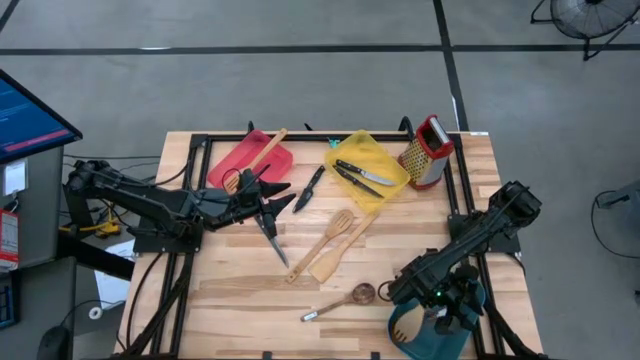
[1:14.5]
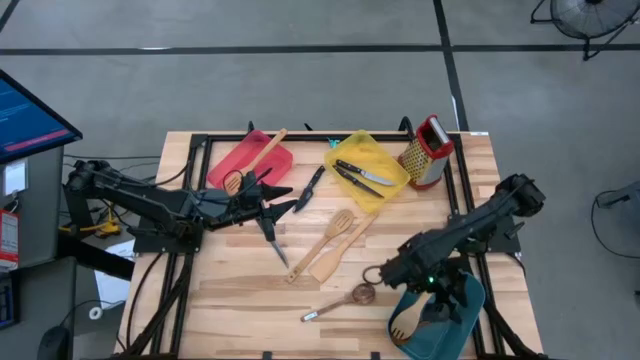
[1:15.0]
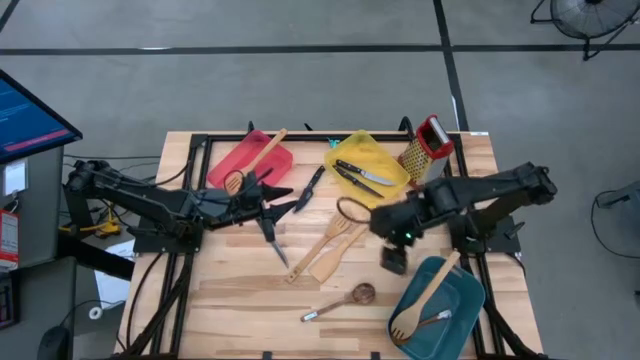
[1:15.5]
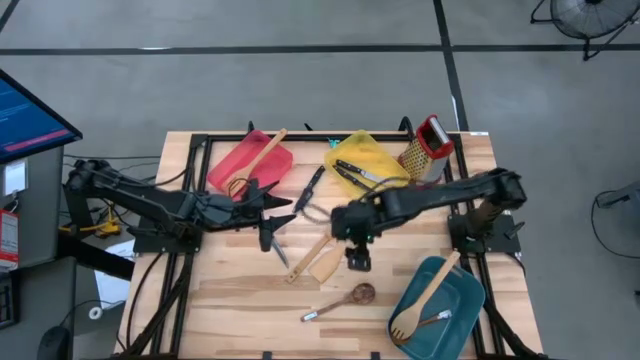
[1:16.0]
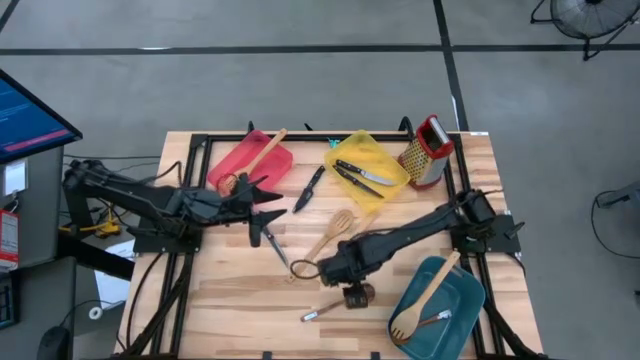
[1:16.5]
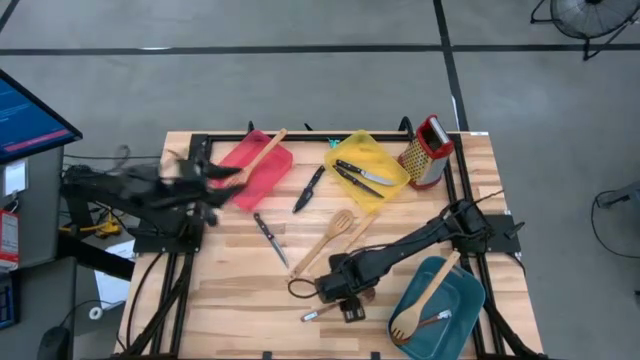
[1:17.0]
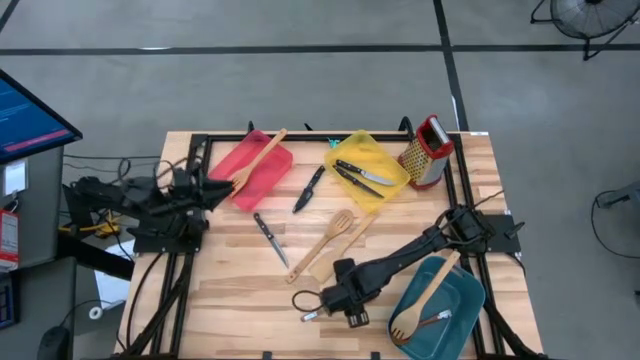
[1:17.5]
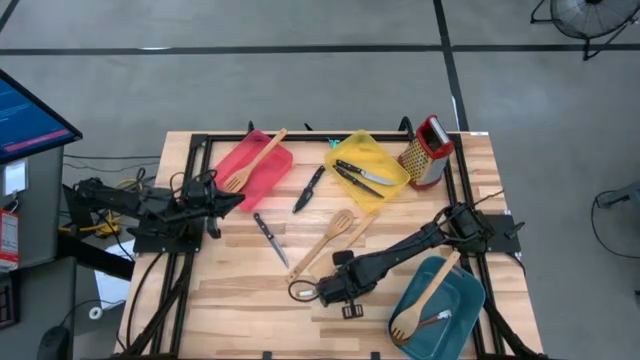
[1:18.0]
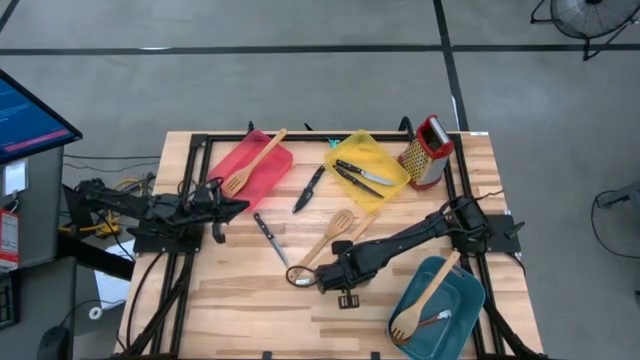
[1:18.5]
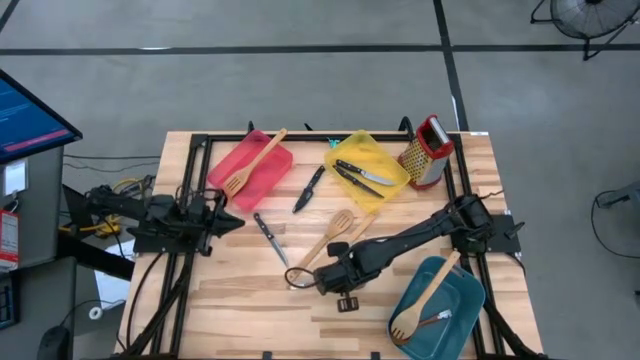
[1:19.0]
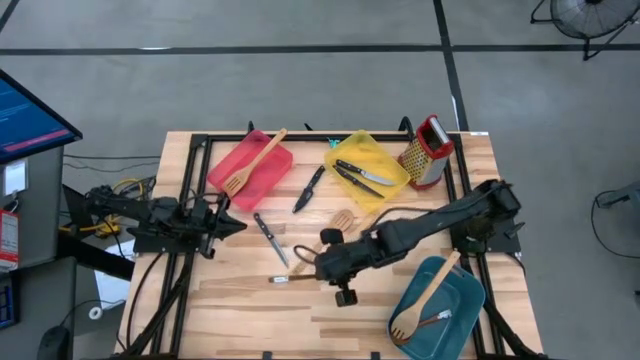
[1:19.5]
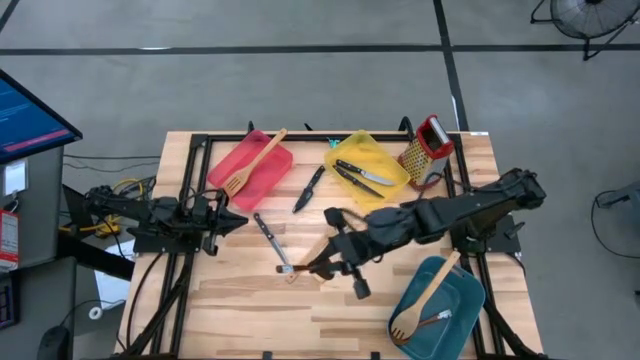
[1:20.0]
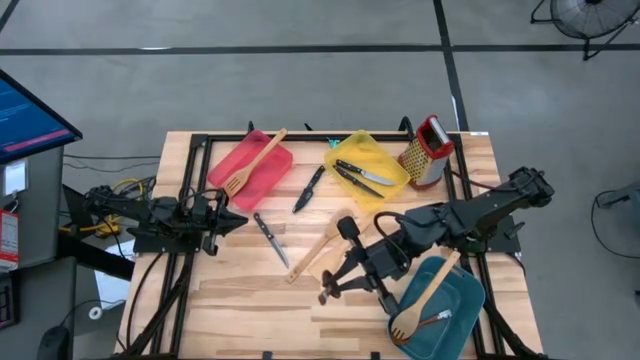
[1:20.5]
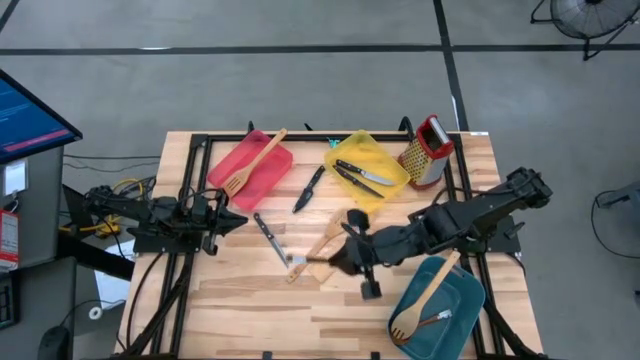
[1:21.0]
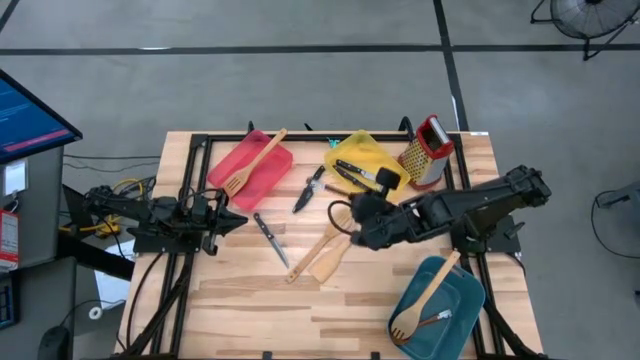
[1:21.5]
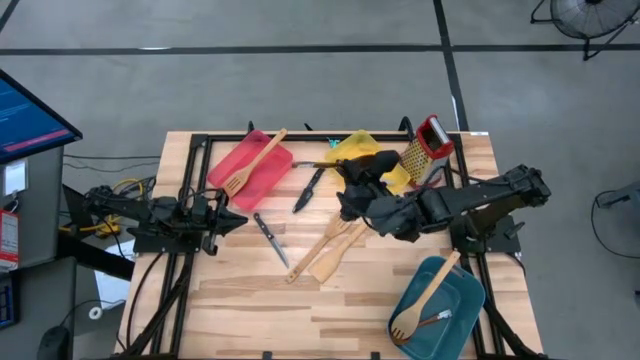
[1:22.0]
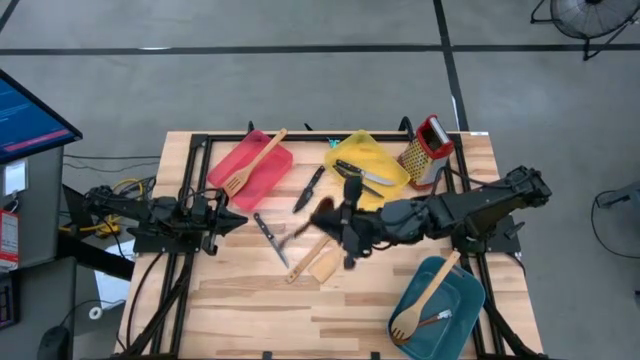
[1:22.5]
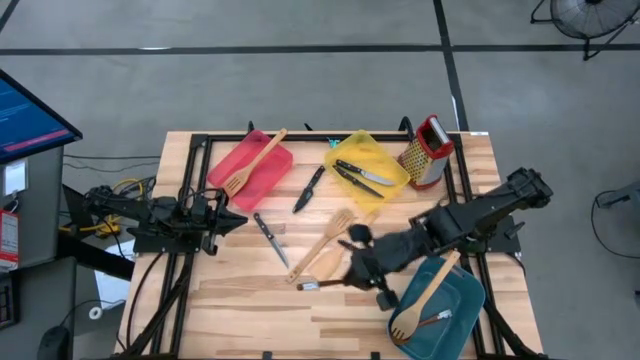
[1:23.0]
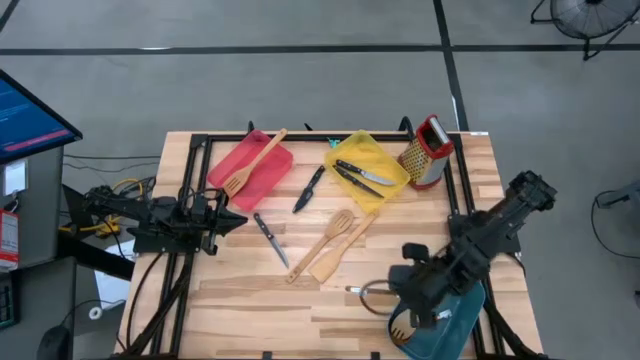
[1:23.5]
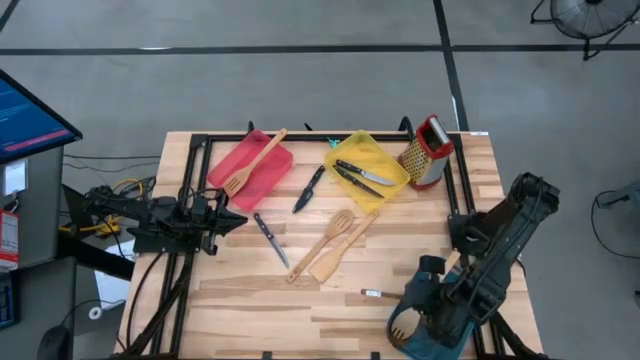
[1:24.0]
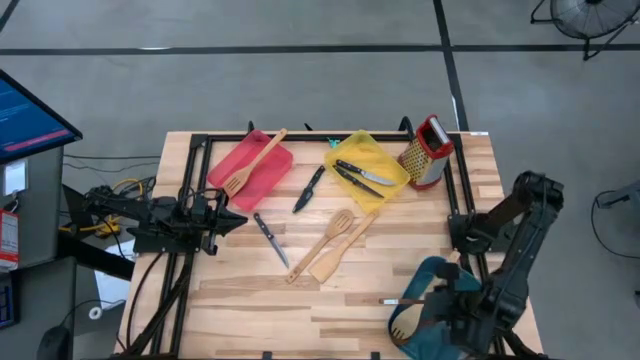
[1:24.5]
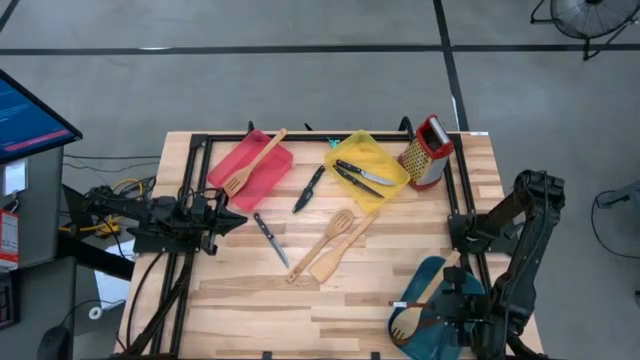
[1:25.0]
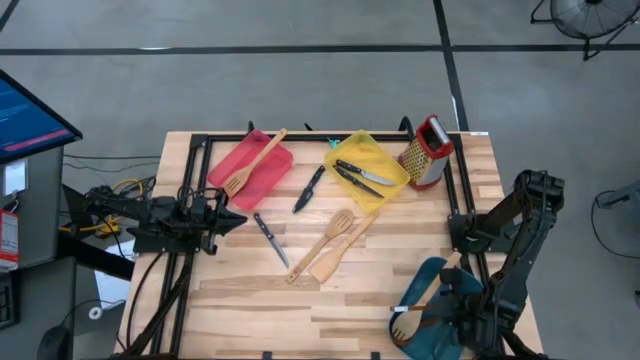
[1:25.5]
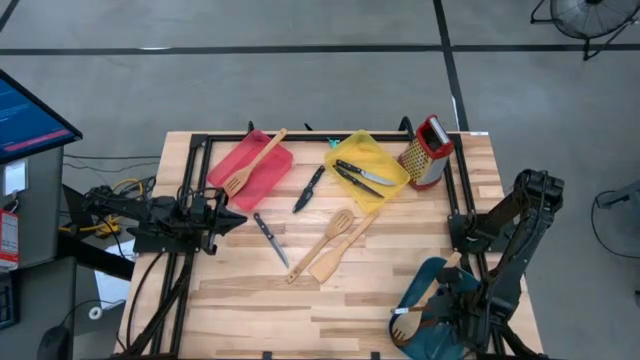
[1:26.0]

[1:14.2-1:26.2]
Task: Pick & Place Kitchen Items
Put the wooden serving spoon into the blue bin

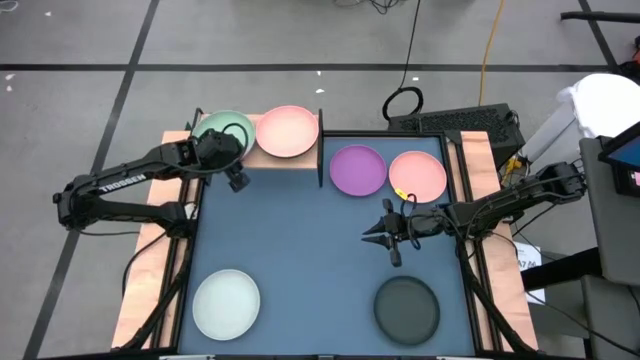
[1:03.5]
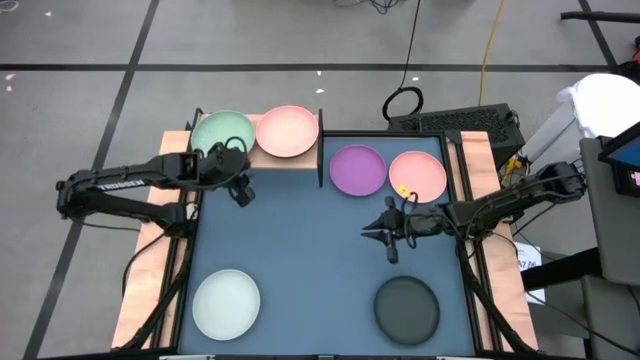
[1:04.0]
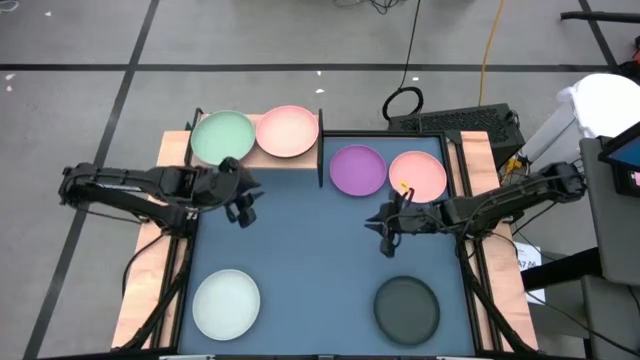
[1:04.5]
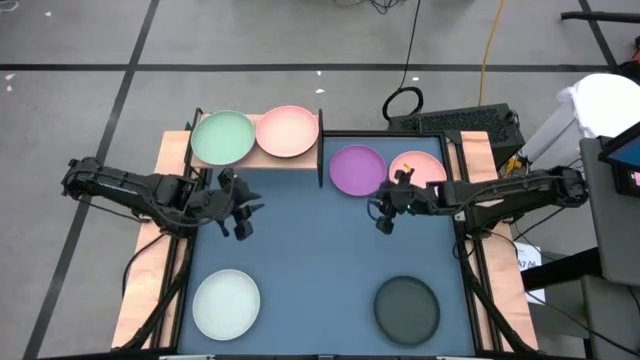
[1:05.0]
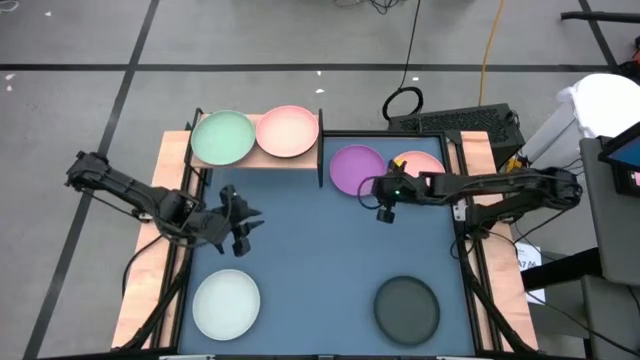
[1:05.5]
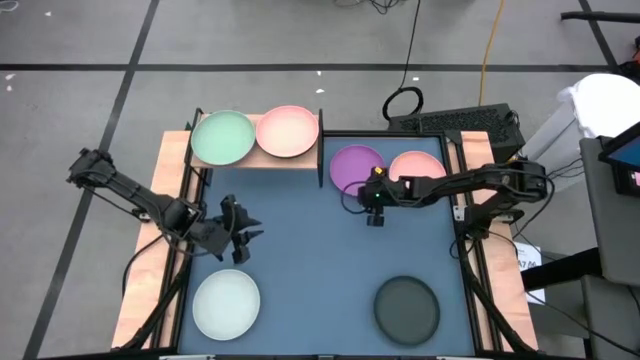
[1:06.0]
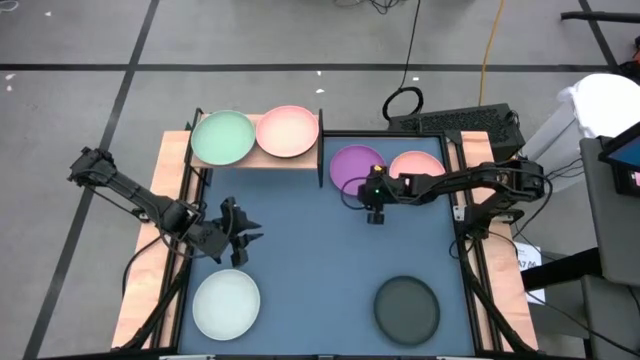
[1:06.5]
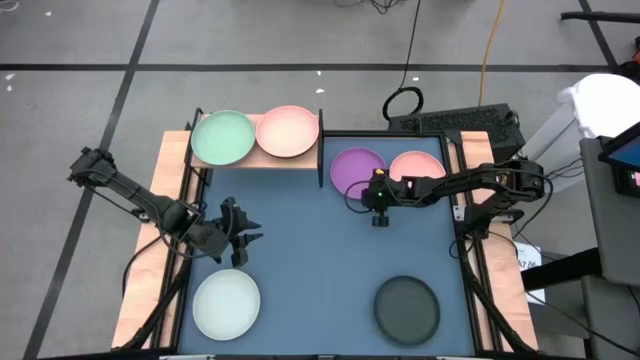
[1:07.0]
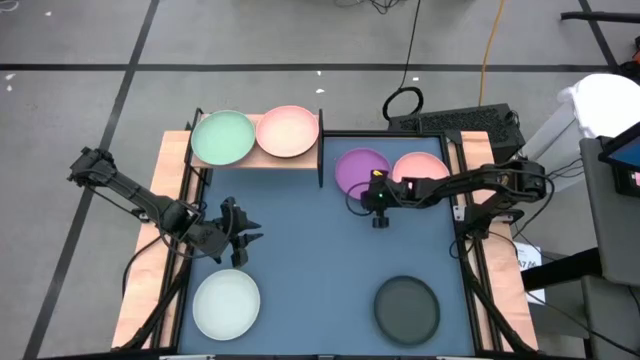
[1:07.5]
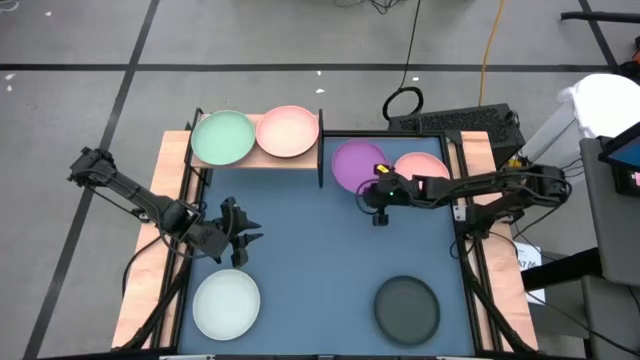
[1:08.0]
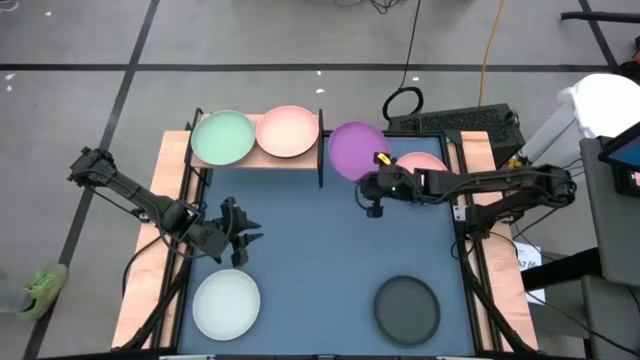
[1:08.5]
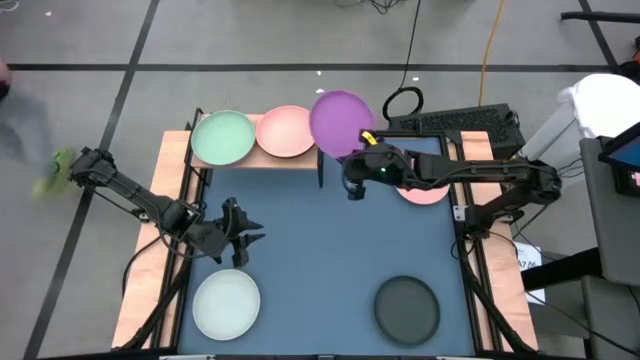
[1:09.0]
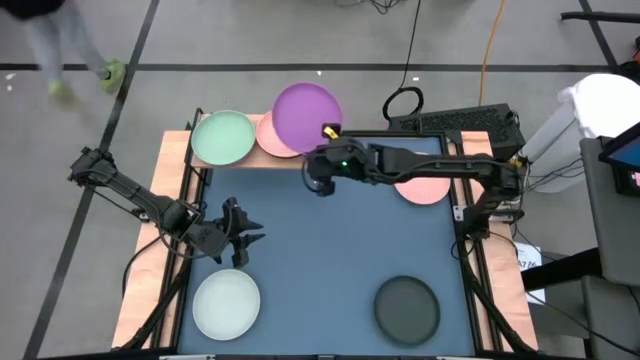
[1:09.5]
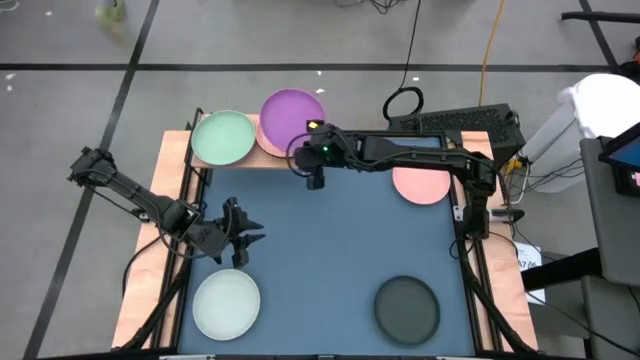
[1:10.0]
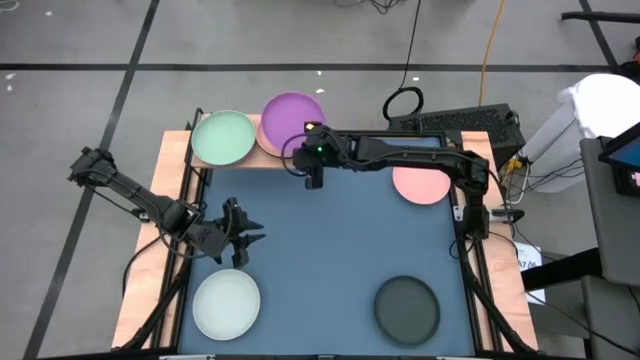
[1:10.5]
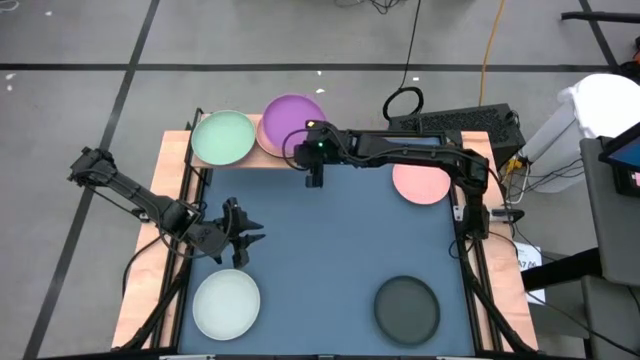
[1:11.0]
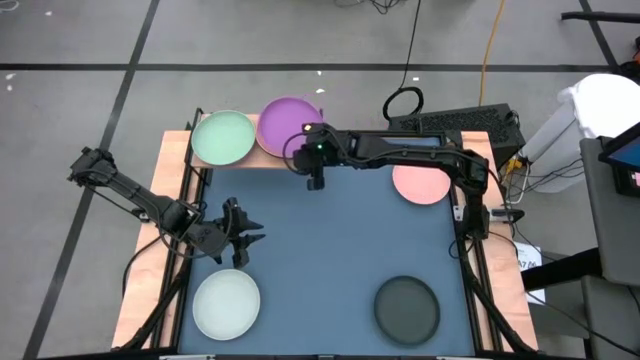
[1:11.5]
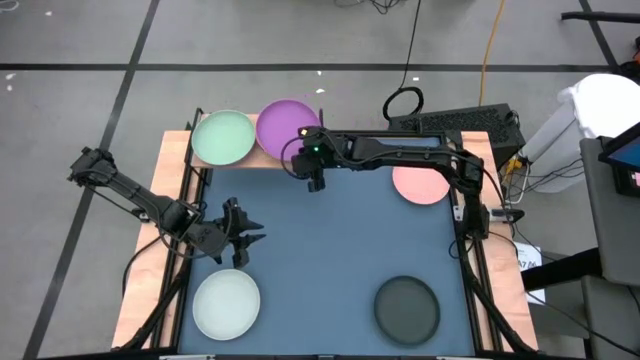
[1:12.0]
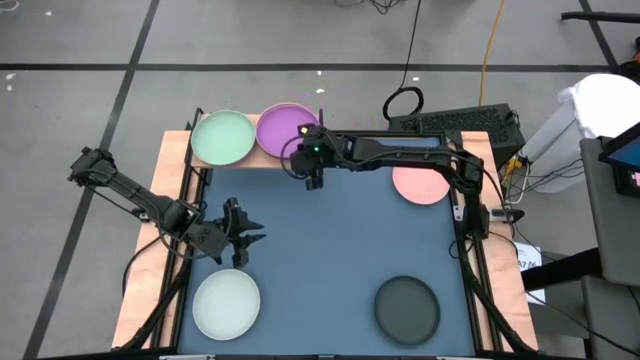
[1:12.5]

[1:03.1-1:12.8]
Task: Place and stack plates onto a shelf
Stack the purple plate on the light pink plate on the shelf
